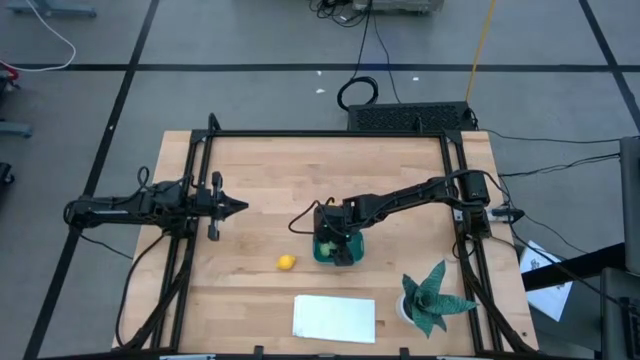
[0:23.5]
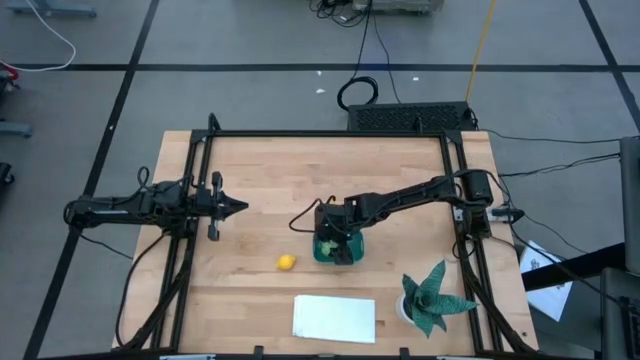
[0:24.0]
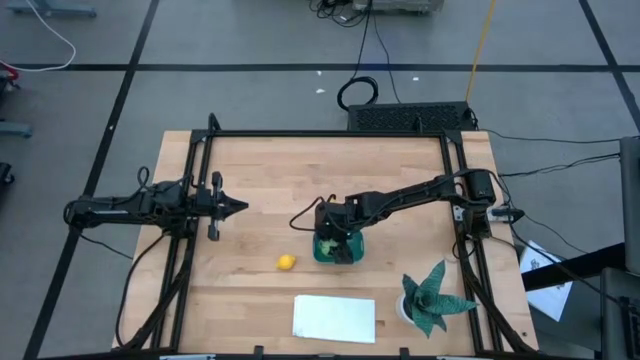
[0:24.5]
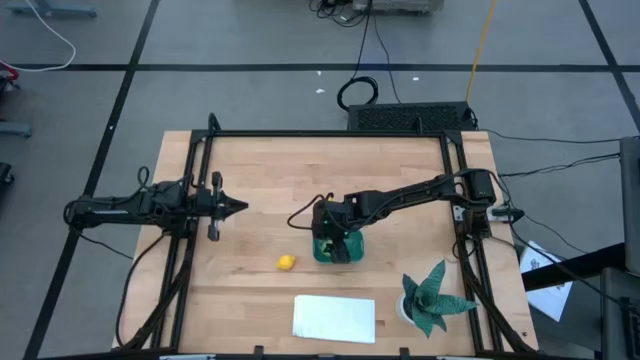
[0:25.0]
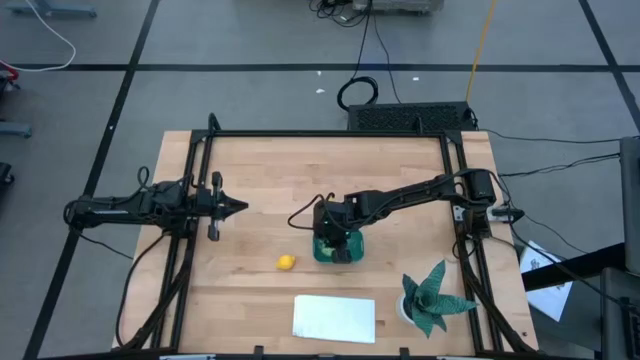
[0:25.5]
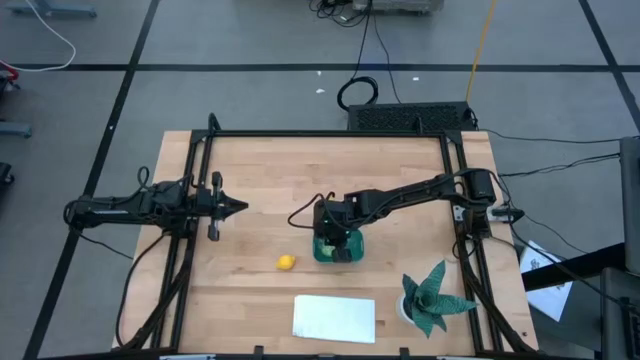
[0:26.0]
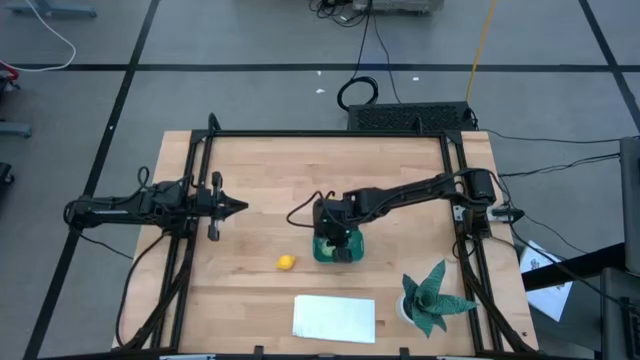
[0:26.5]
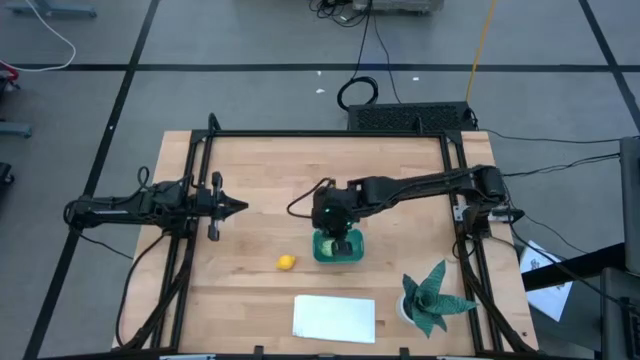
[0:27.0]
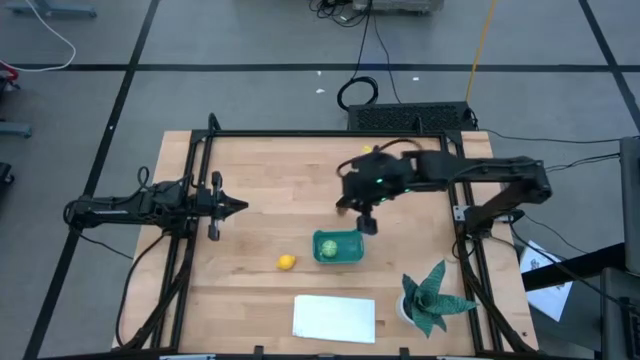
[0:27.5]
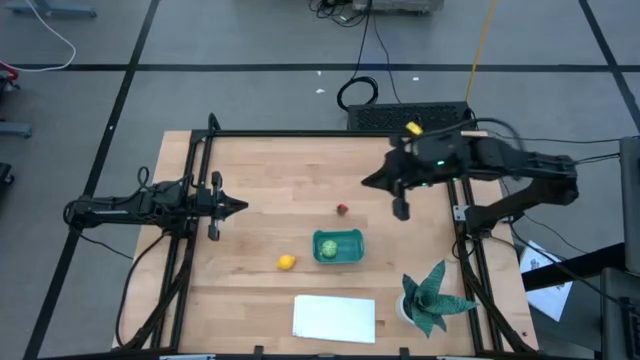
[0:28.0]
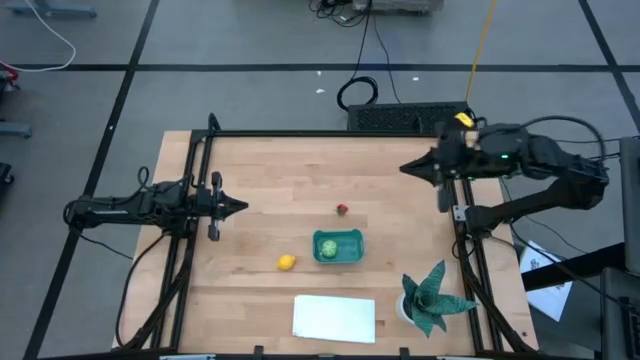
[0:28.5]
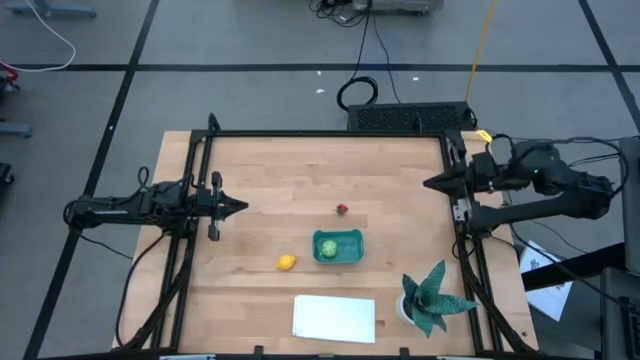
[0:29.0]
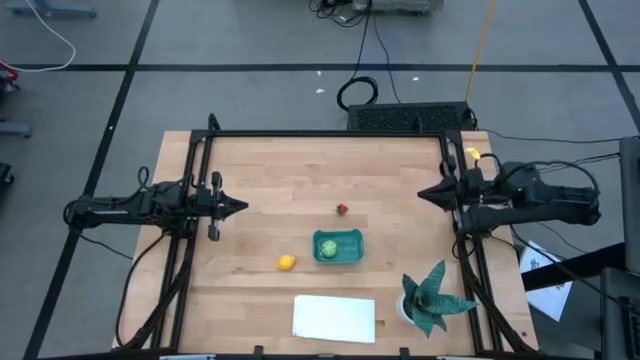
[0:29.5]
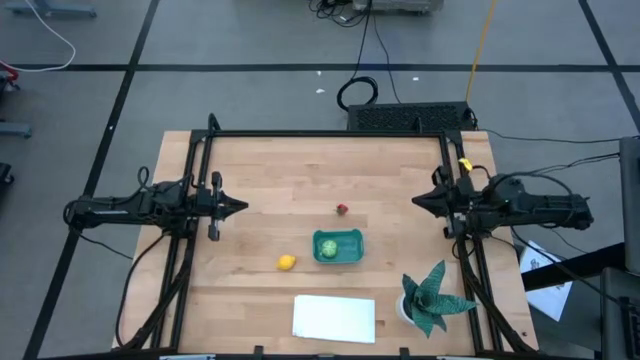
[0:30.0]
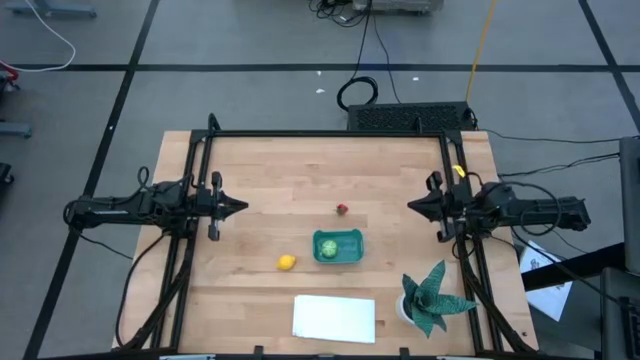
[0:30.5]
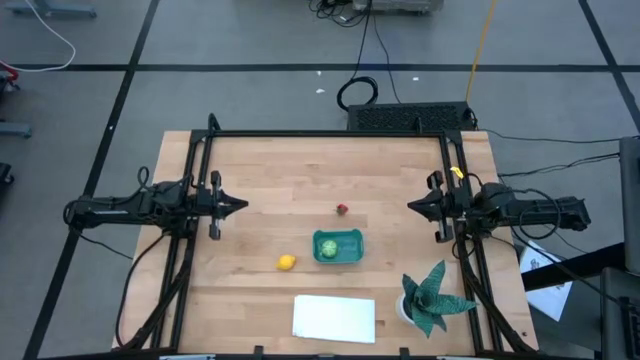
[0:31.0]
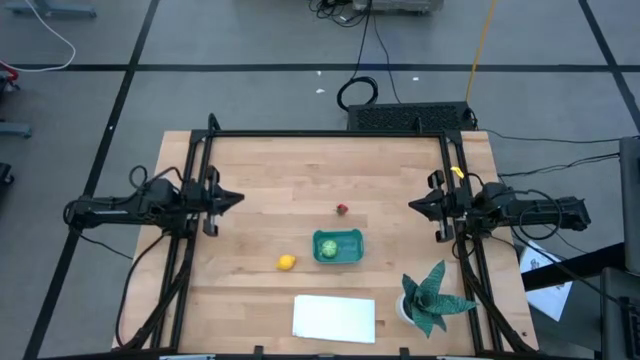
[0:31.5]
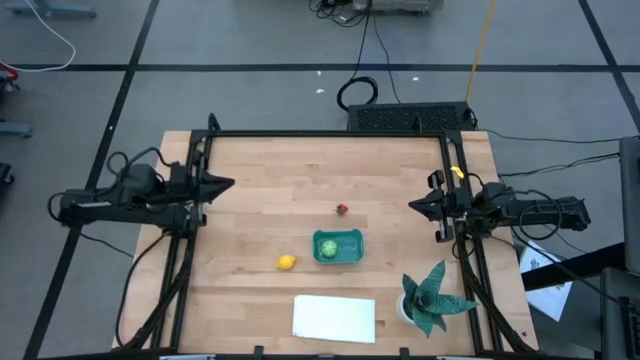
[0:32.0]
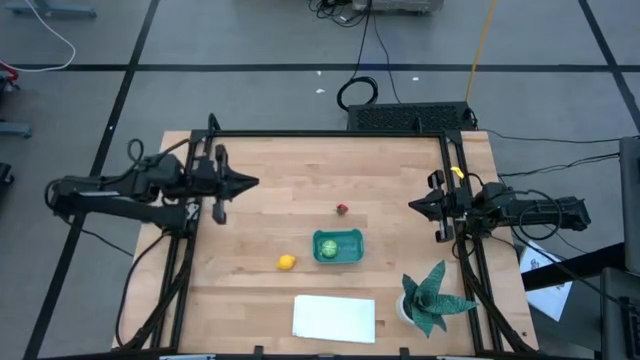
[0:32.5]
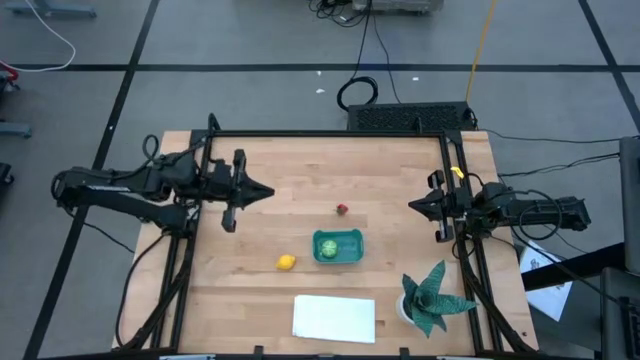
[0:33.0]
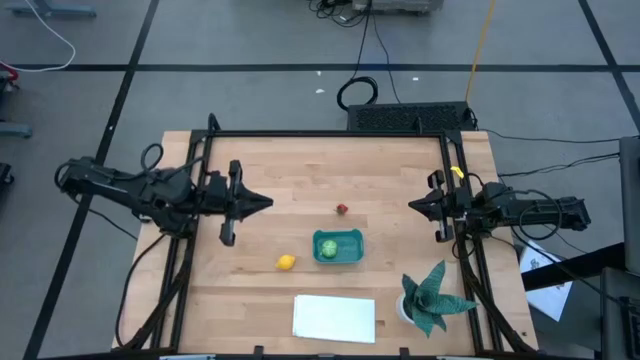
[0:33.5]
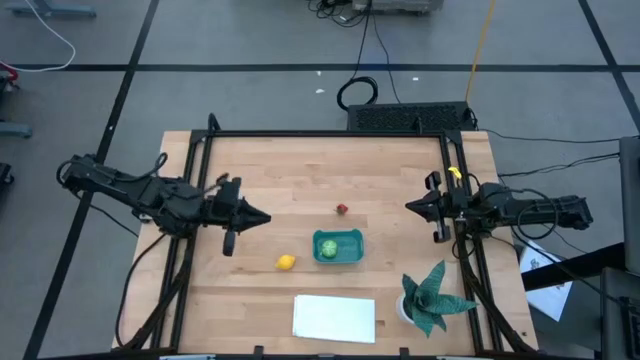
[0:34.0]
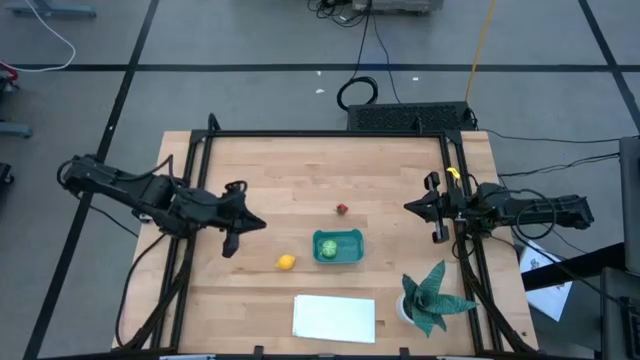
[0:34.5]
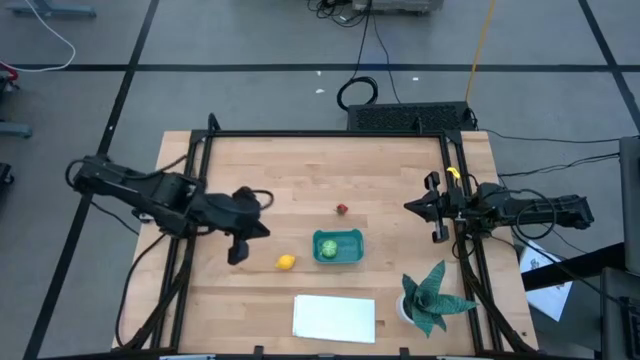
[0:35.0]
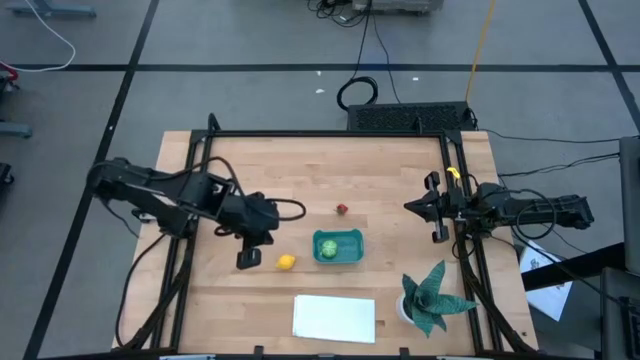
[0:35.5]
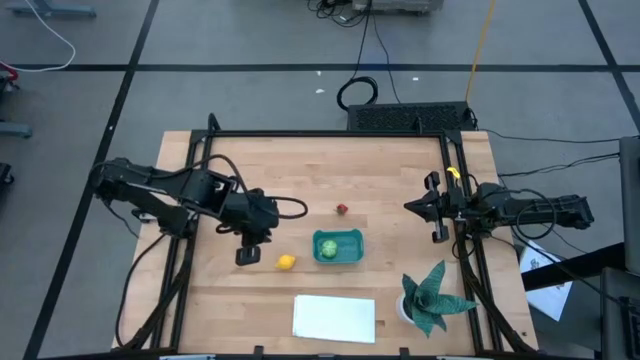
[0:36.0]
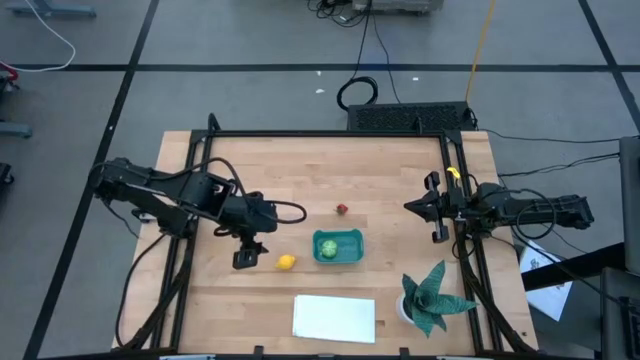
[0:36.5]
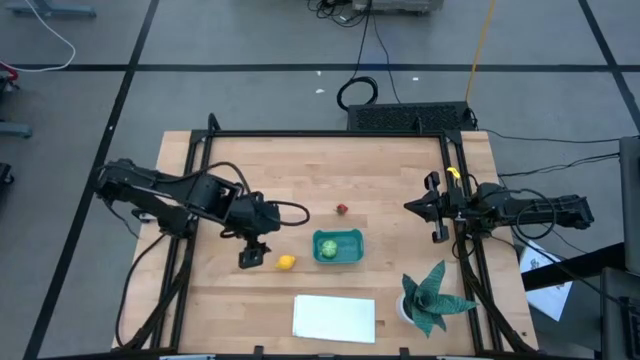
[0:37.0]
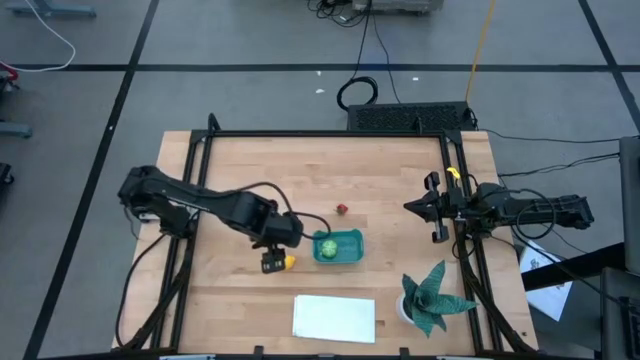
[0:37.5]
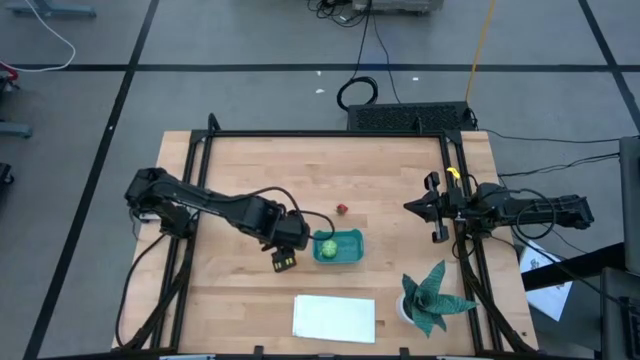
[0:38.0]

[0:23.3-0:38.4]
Task: Pick and placing Produce into tupperware
Put the lemon into the bin

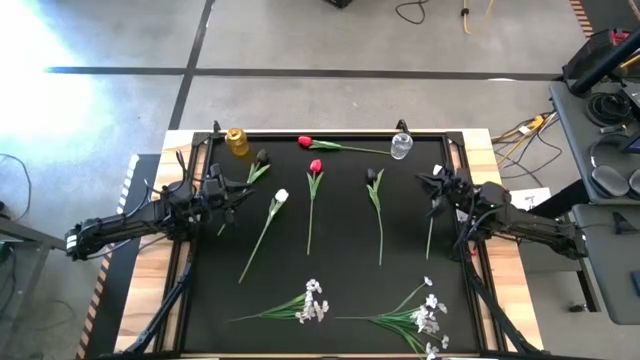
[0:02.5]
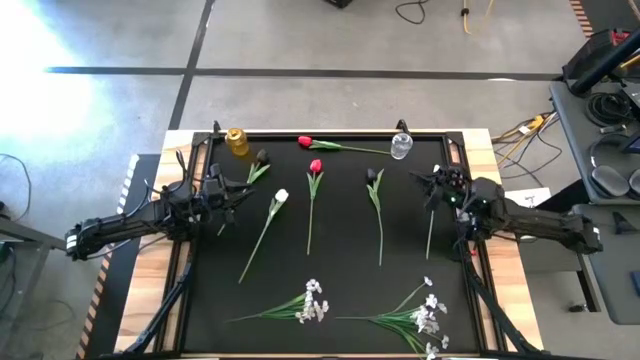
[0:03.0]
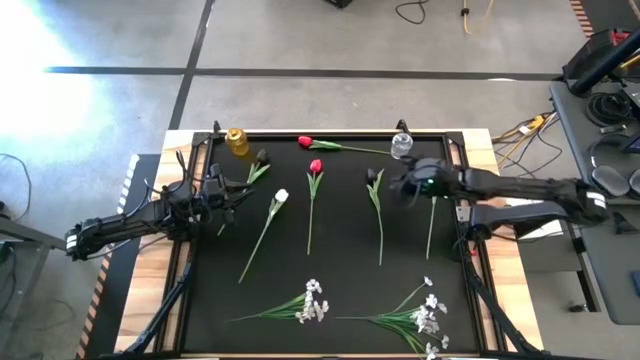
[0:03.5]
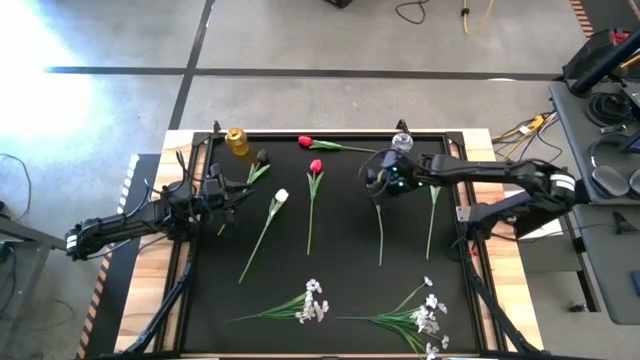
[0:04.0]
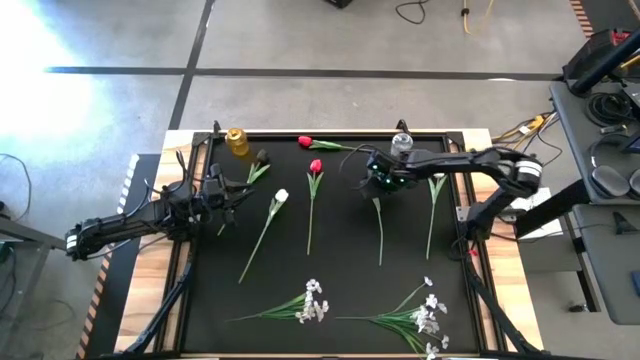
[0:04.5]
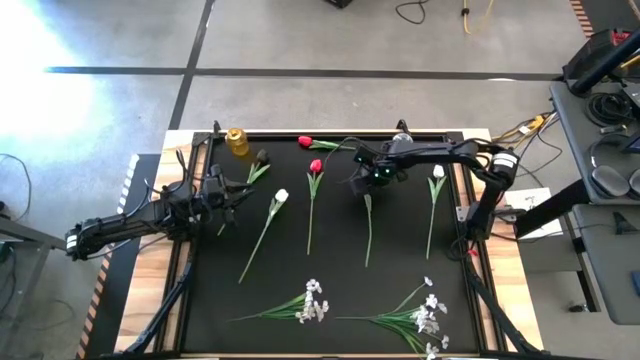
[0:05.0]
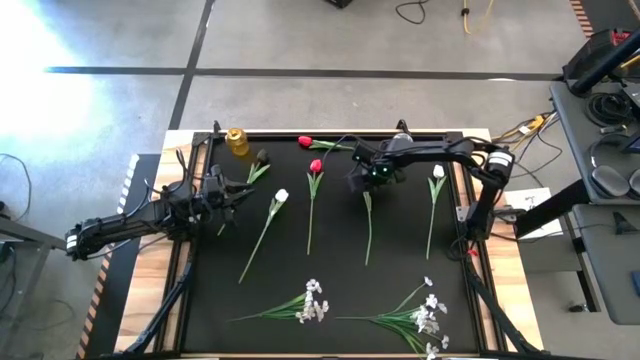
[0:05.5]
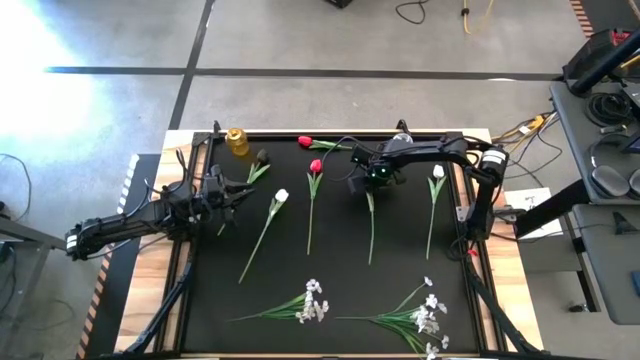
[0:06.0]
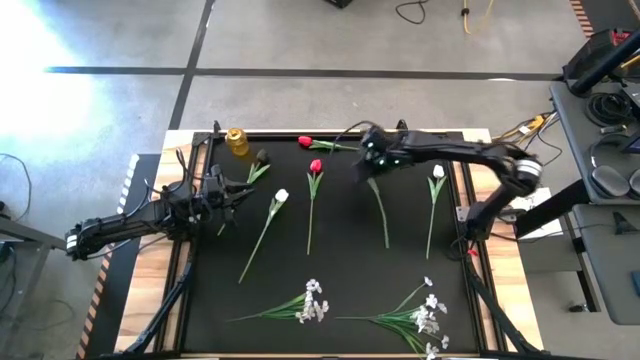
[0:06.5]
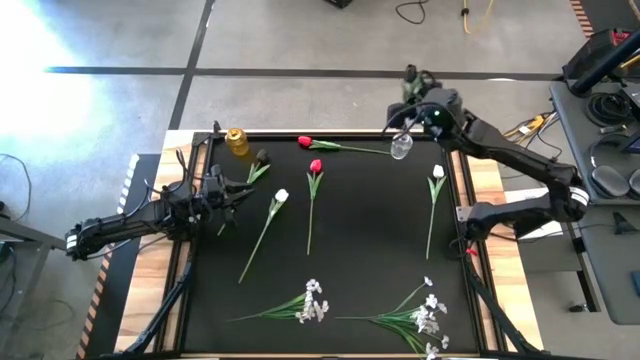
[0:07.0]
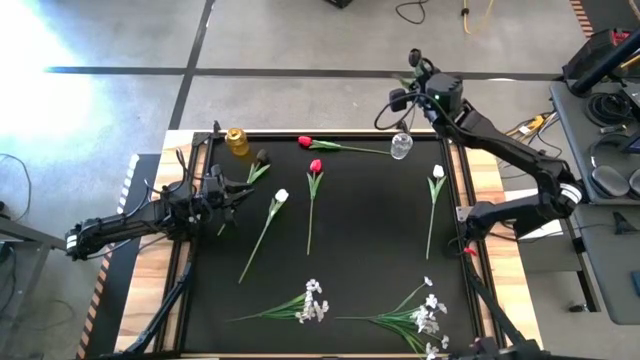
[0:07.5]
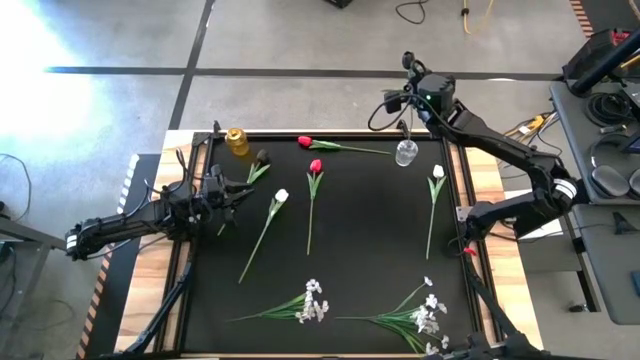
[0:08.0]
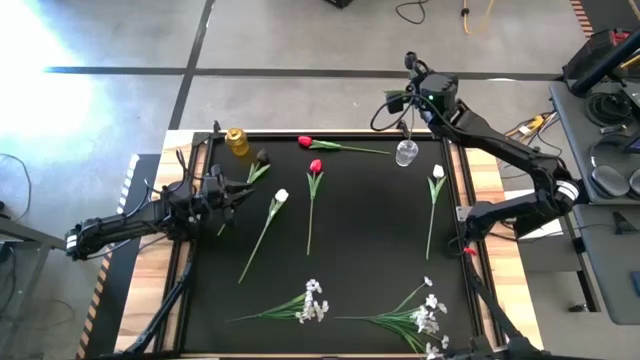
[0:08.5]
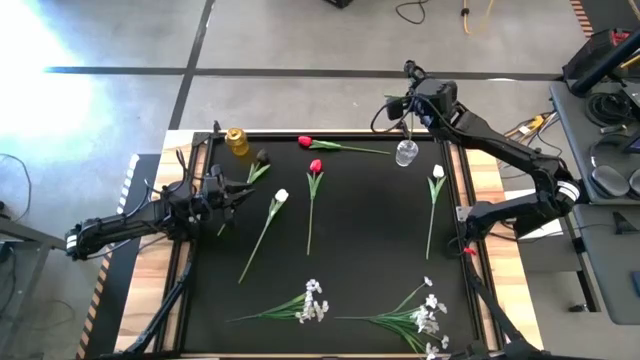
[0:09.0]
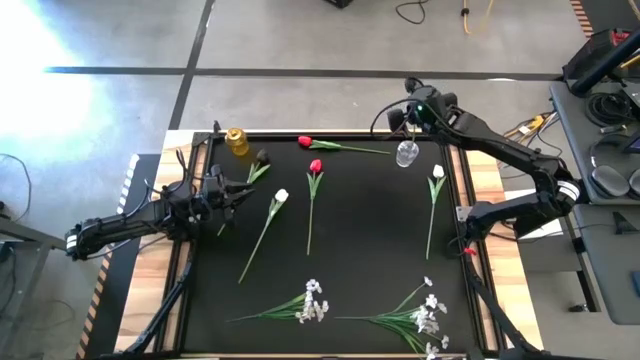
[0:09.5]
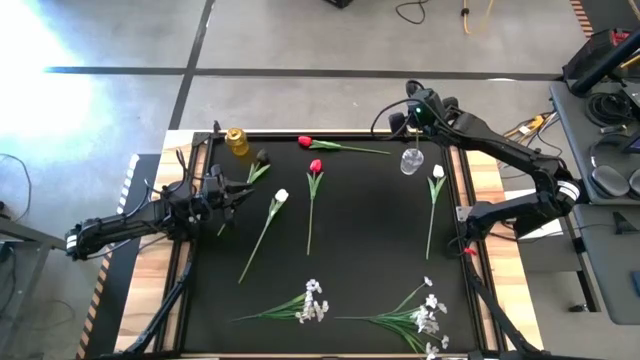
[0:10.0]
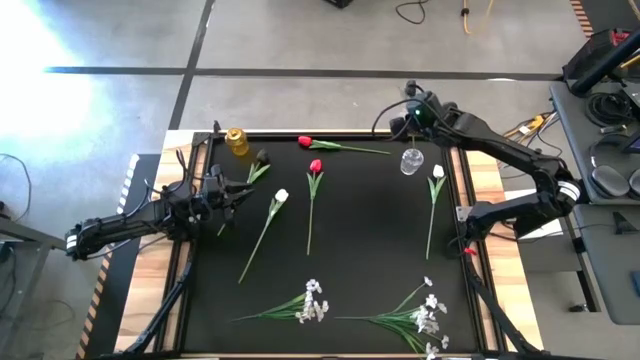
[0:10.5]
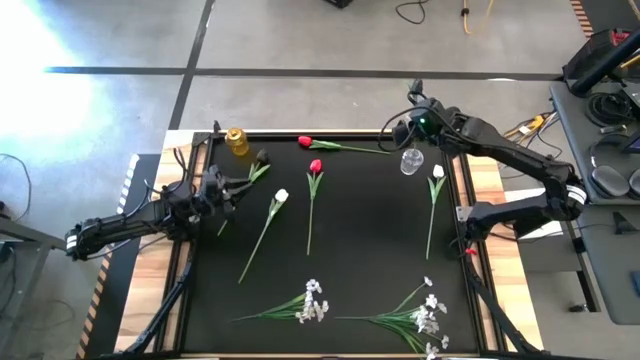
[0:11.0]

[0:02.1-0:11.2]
Task: Sort flowers into vase by color
Put the right black tulip into the transparent vase
